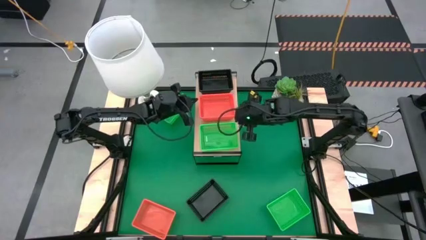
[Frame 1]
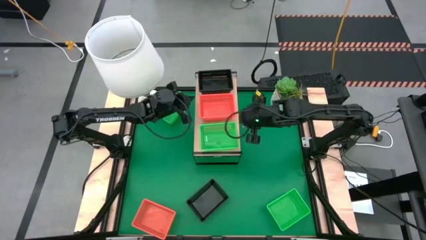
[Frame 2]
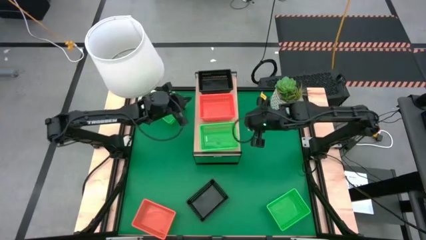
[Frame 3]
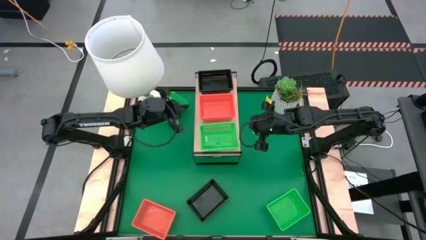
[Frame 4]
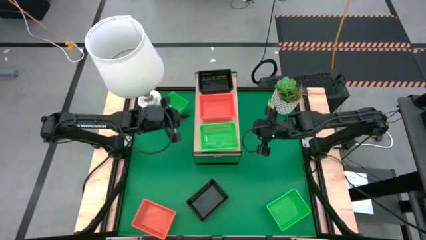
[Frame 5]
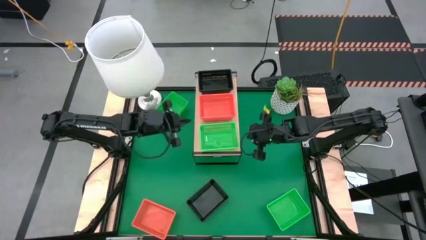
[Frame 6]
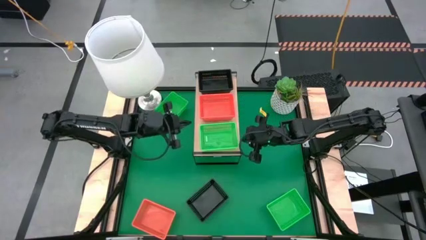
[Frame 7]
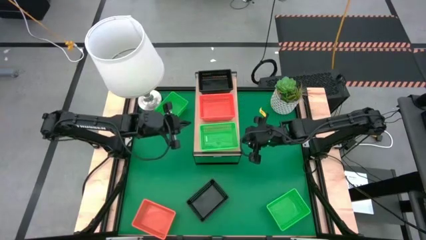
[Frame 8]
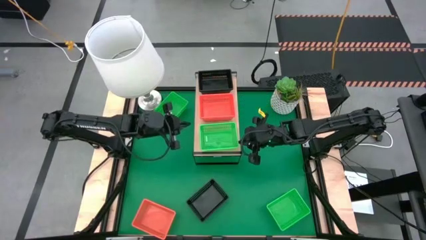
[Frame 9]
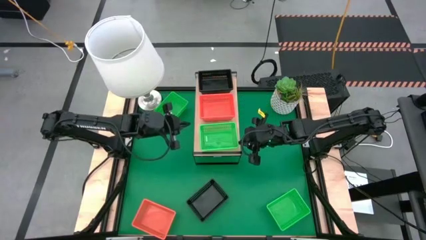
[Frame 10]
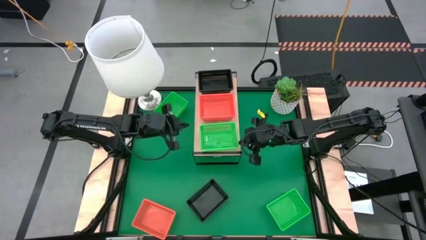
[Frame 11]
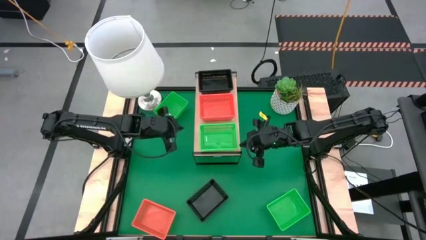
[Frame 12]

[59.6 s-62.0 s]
Task: Stack baskets on shelf by color
Adjust the green bin on the shelf

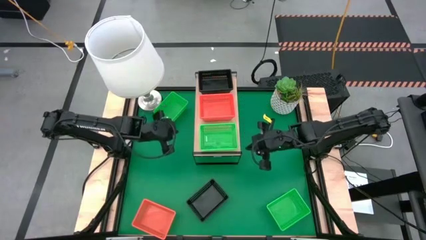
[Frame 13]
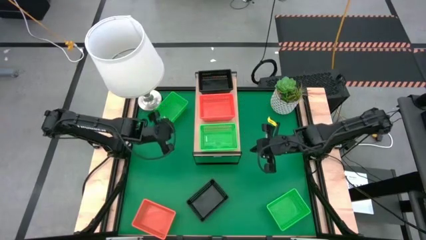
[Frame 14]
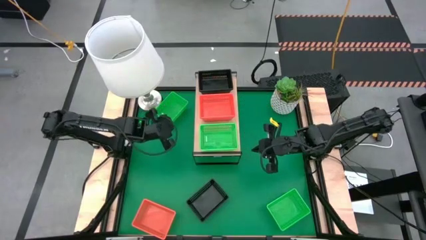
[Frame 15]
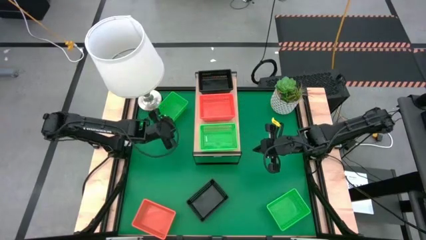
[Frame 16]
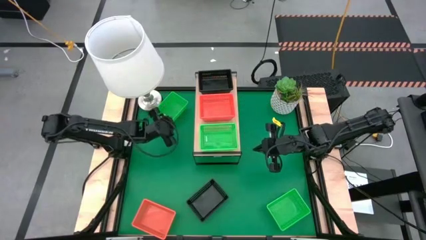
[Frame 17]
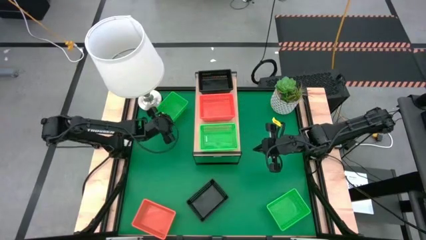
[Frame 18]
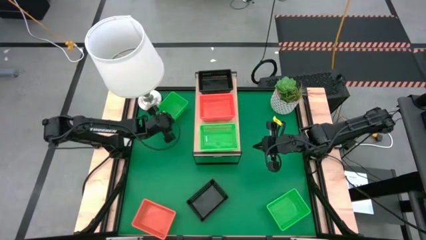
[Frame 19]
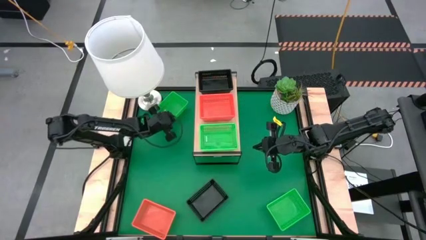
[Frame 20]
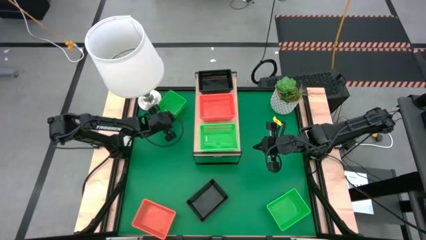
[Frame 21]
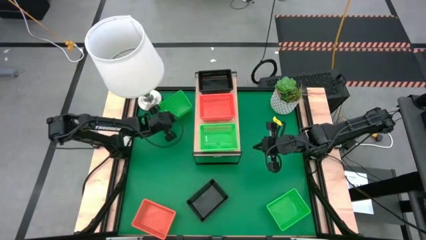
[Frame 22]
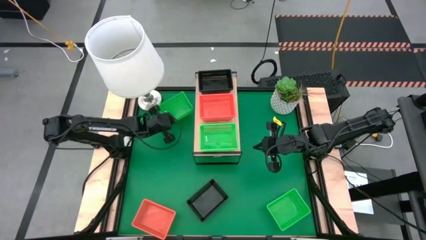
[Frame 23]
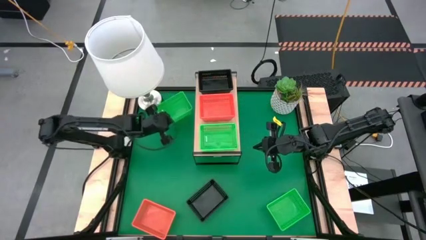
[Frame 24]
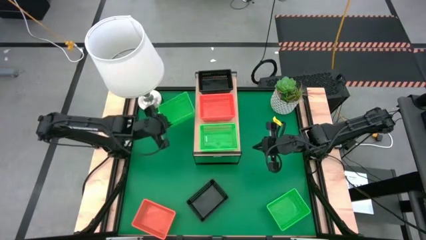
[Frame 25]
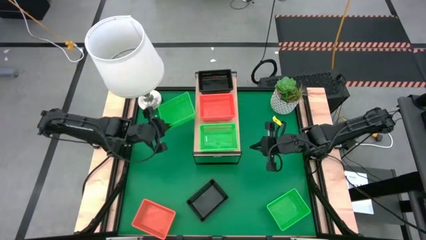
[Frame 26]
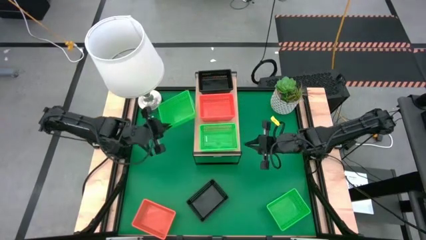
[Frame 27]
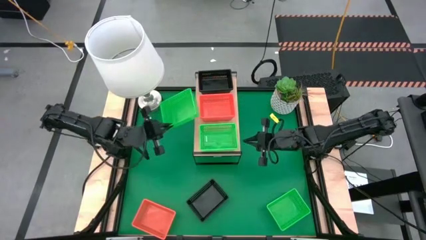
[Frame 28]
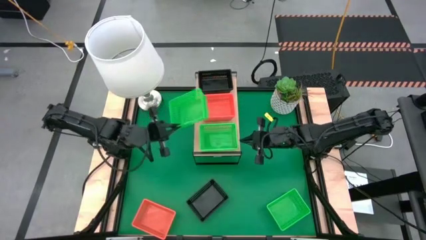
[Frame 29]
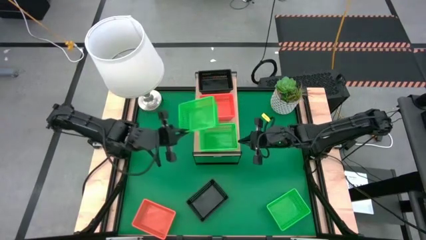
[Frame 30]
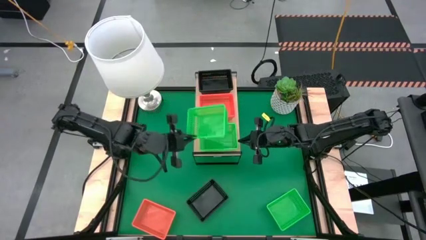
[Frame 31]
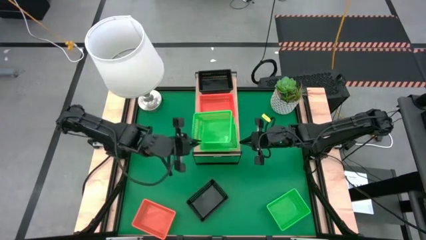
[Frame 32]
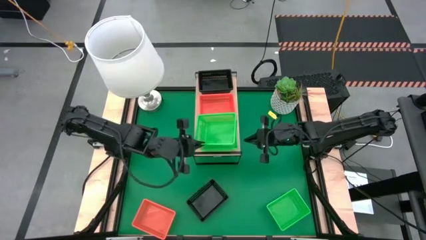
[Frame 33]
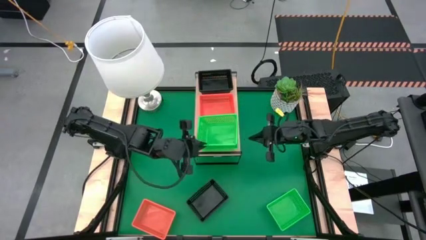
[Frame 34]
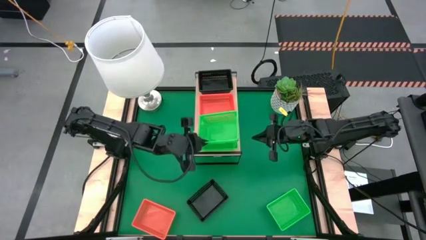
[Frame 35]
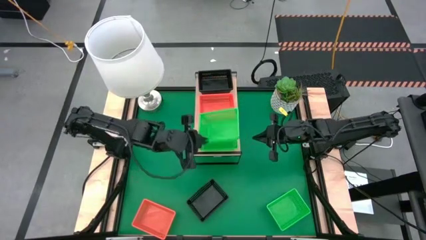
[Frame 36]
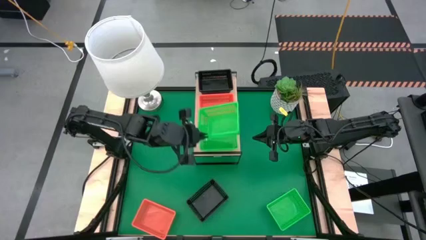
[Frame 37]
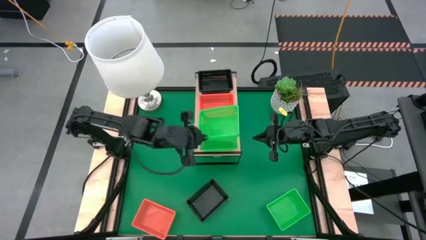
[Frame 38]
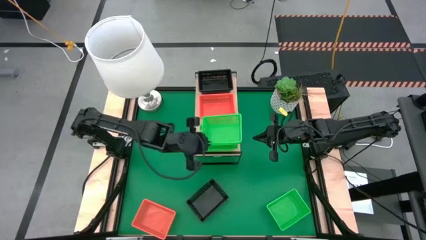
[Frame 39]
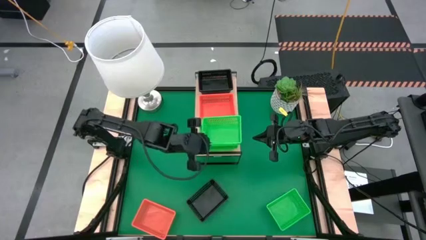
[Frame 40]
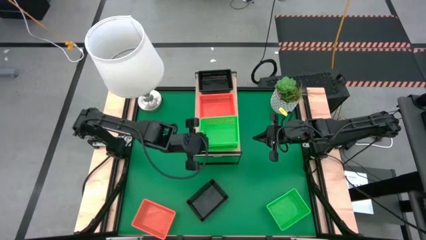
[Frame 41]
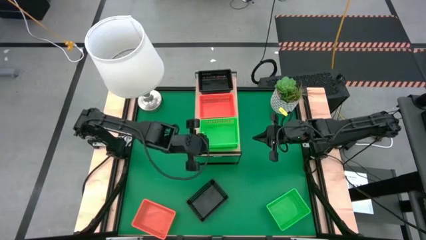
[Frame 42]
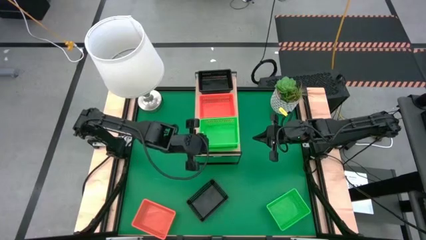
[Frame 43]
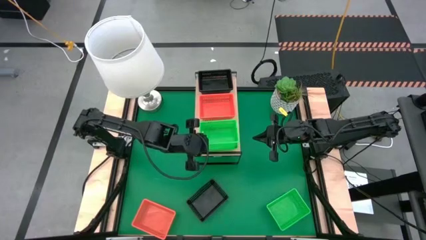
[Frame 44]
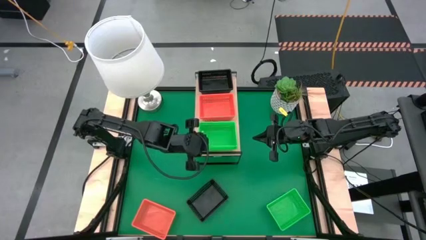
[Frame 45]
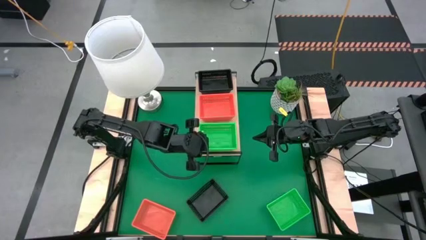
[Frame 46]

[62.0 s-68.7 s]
Stack the top green bin on top of the green bin on the shelf

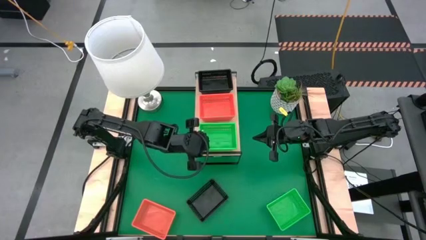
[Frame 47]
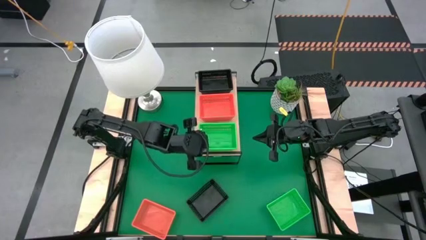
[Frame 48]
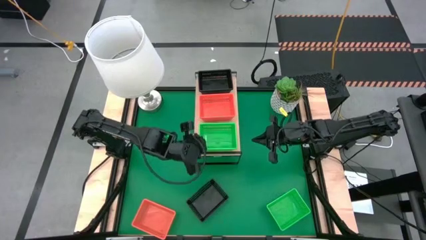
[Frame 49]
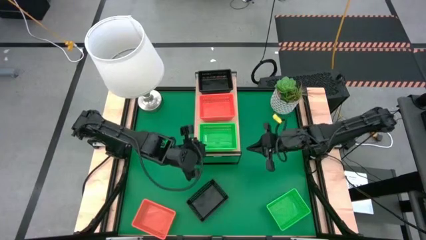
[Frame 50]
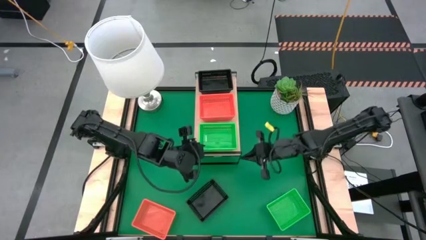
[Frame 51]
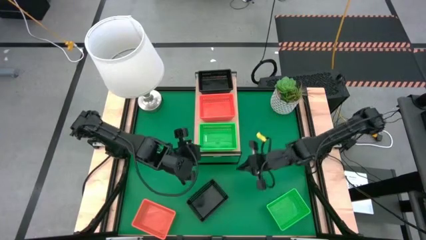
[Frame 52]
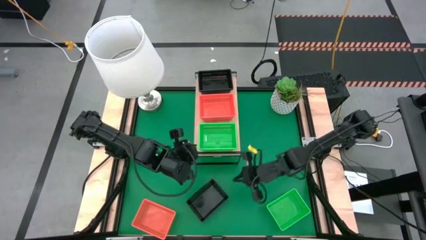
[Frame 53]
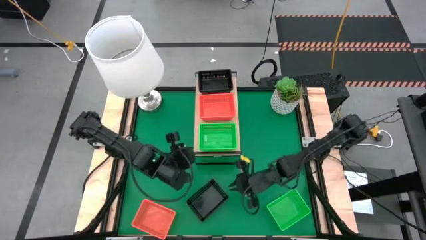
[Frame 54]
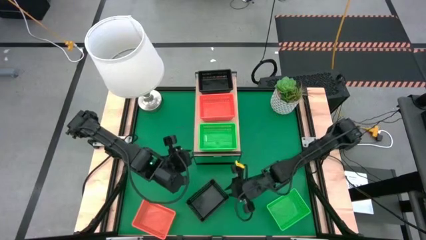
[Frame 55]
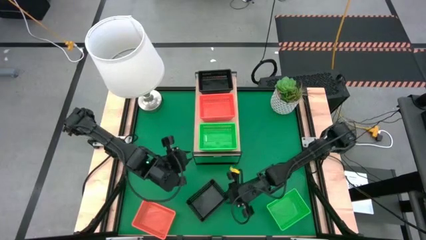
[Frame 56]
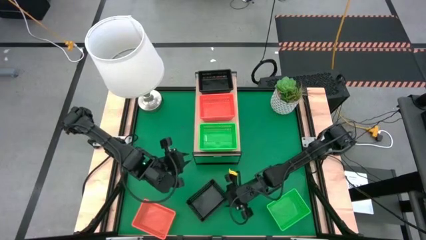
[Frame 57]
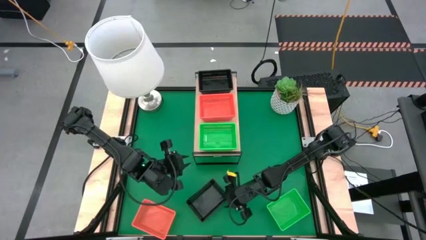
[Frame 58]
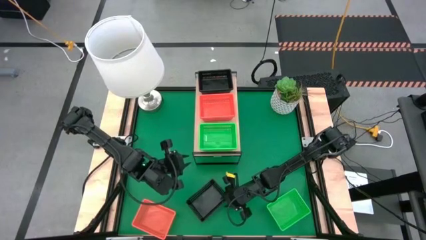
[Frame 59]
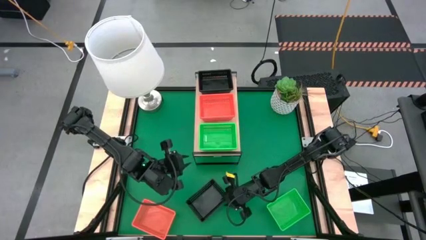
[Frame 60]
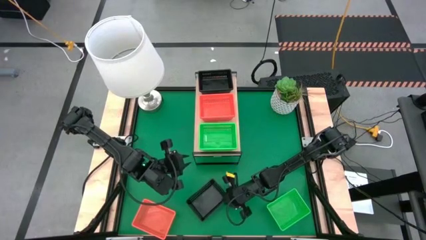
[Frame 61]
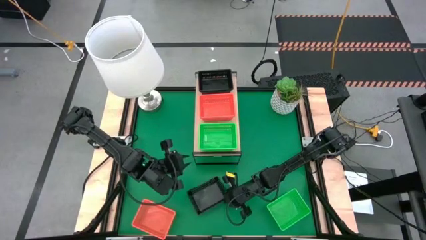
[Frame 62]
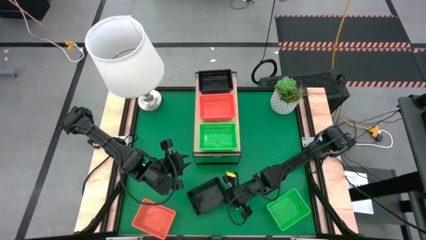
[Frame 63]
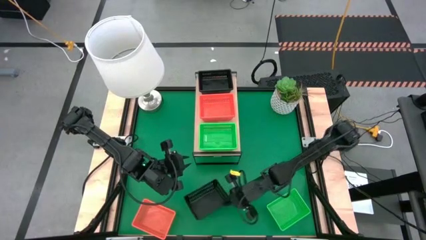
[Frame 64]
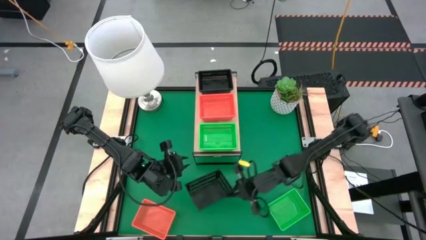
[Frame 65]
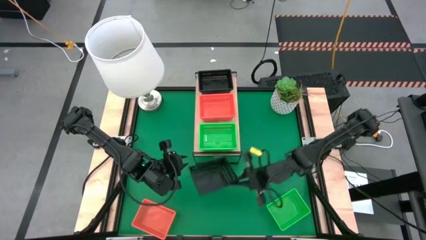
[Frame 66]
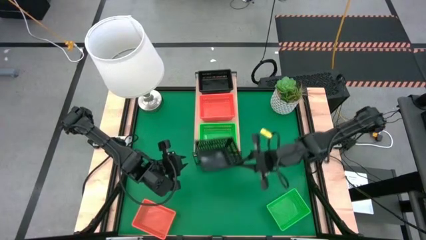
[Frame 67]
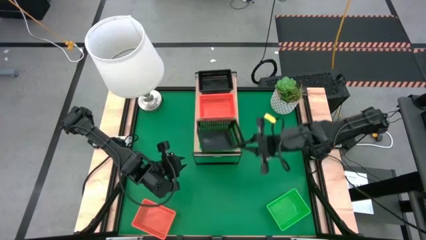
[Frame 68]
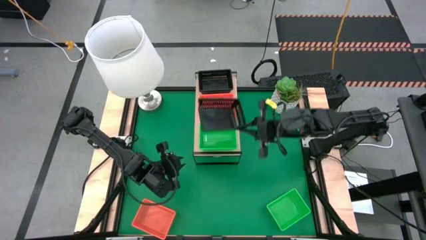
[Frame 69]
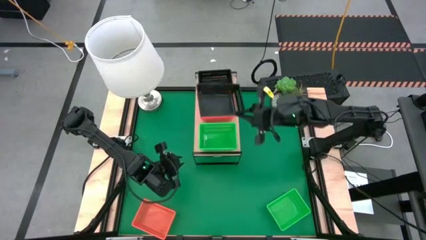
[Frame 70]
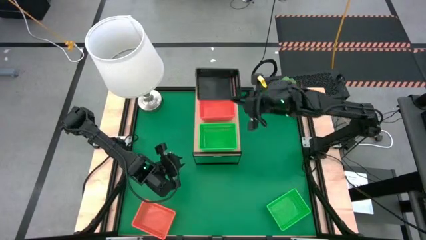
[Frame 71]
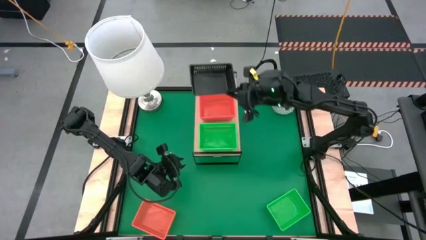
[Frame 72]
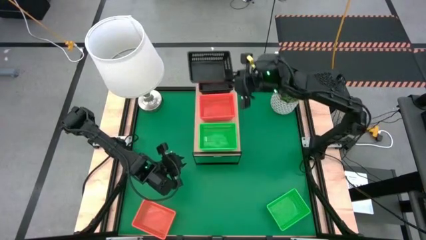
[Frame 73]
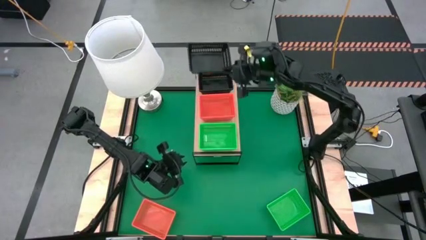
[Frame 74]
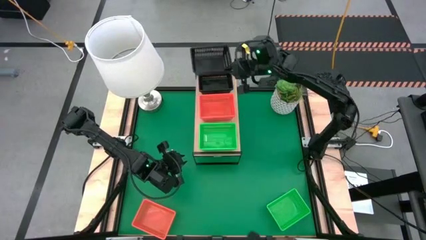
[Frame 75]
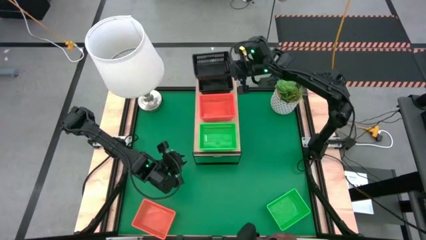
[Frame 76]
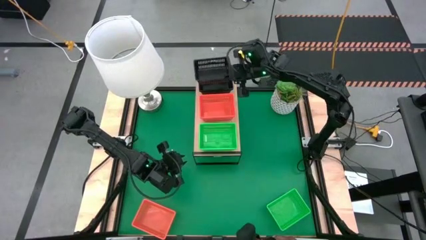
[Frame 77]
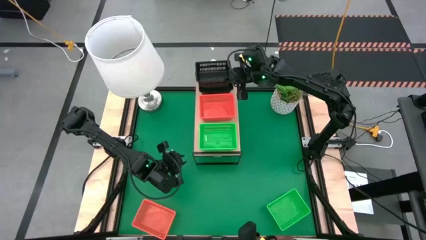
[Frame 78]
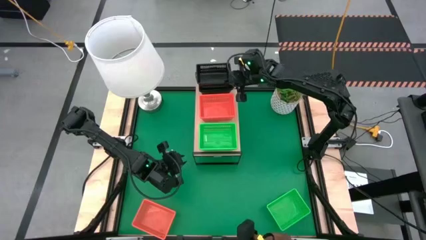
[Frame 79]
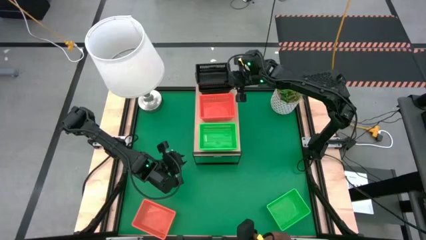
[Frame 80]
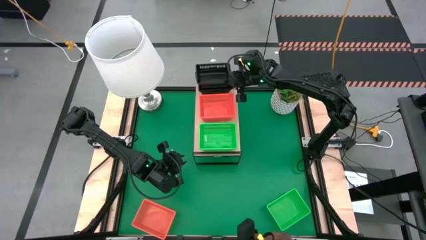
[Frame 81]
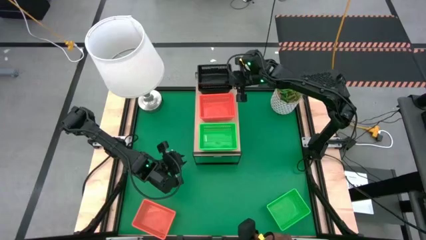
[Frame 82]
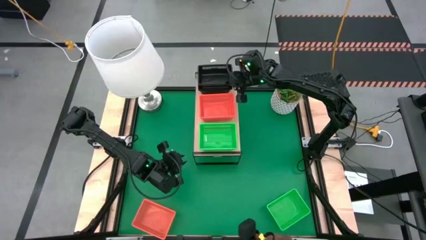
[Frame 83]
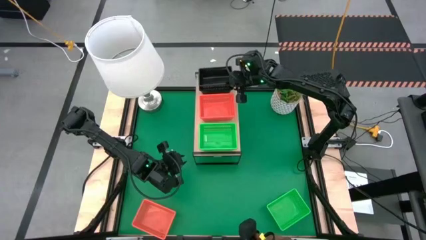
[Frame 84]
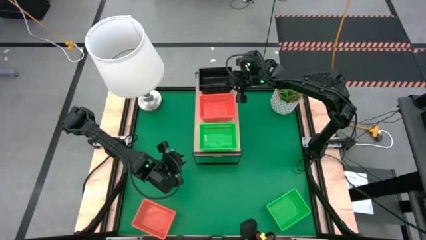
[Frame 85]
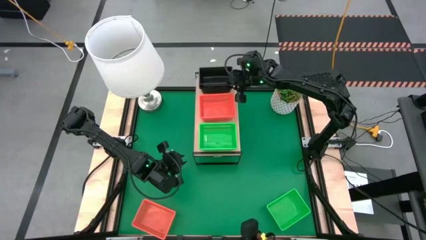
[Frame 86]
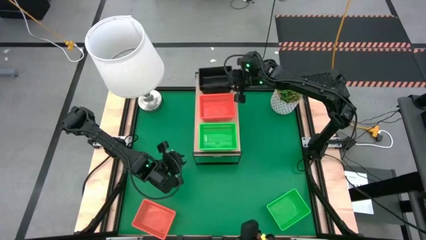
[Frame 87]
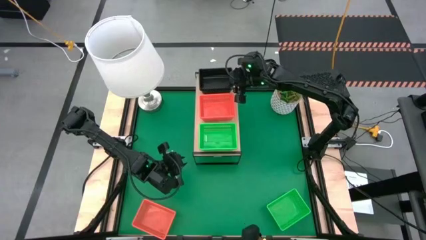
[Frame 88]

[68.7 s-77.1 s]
Stack the black bin on top of the black bins on the shelf
